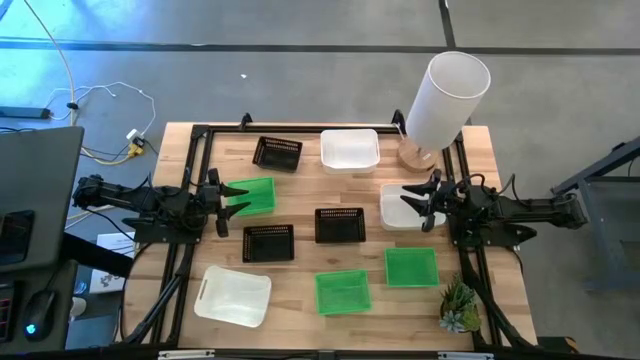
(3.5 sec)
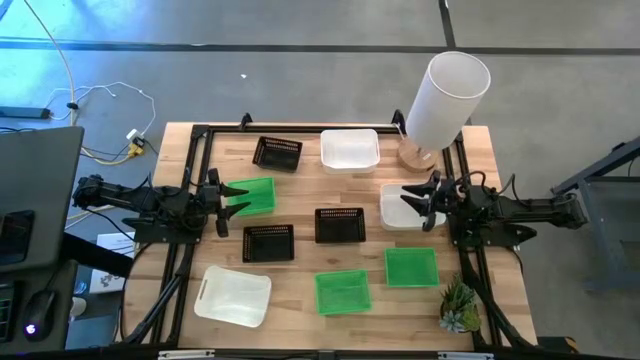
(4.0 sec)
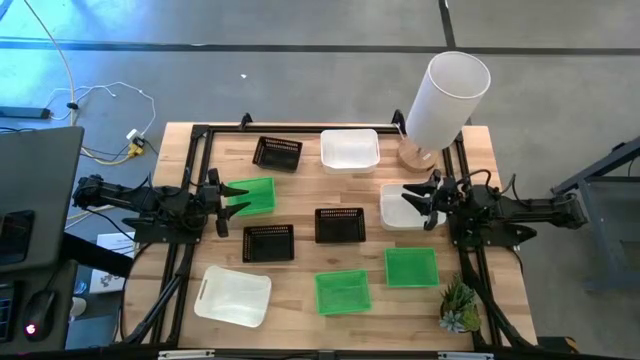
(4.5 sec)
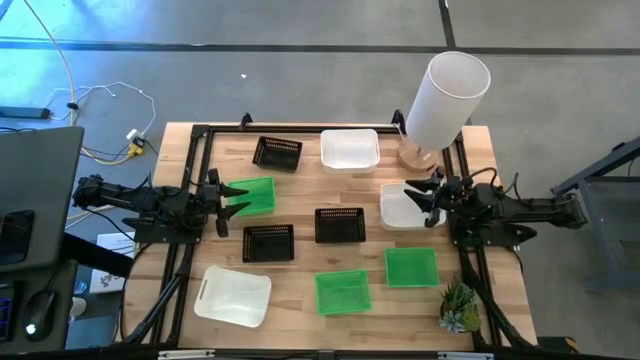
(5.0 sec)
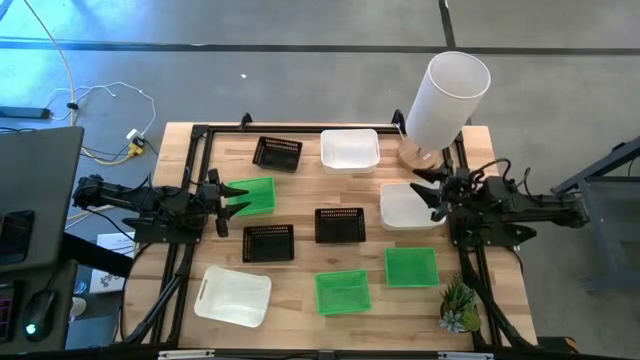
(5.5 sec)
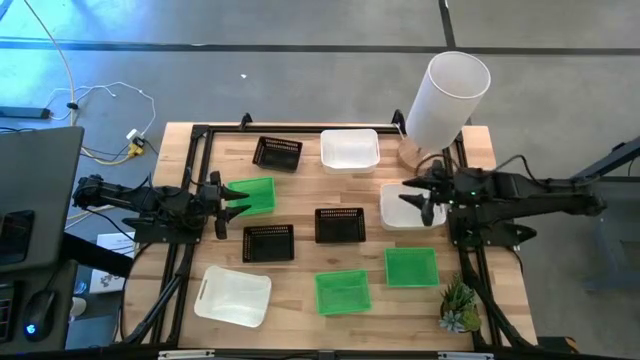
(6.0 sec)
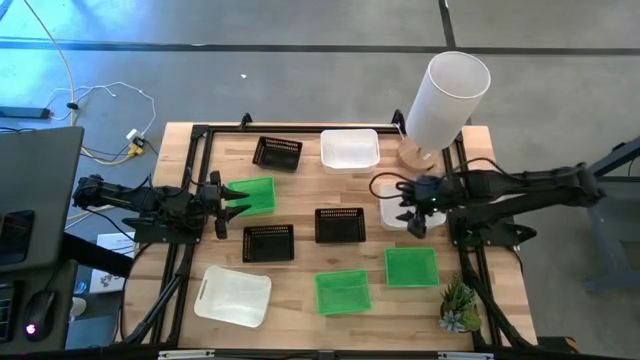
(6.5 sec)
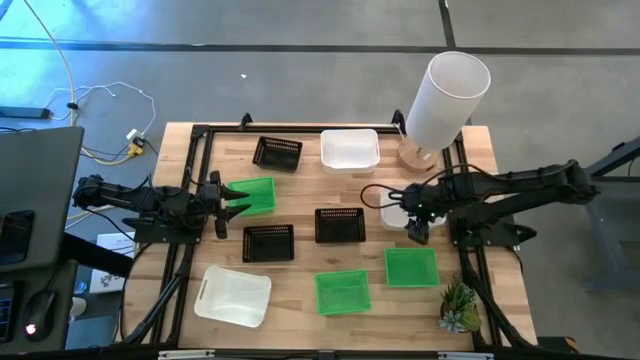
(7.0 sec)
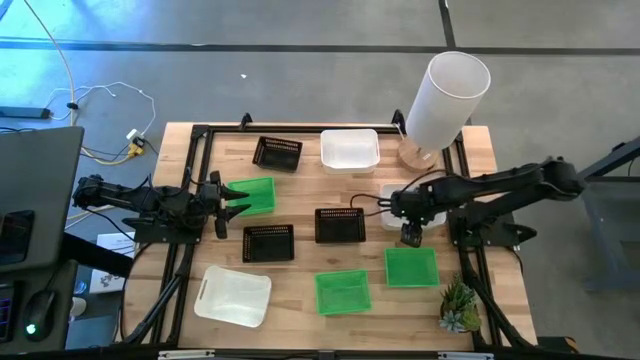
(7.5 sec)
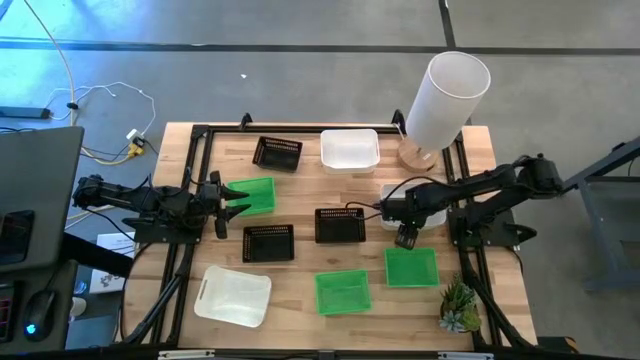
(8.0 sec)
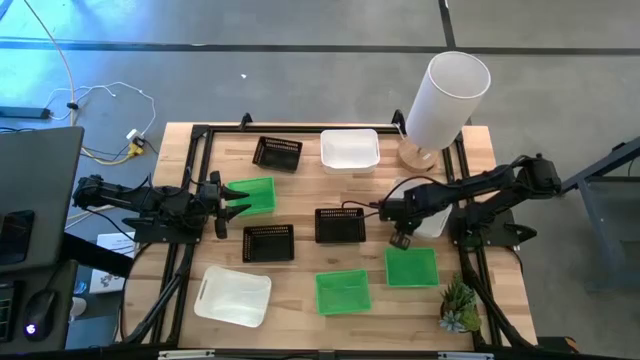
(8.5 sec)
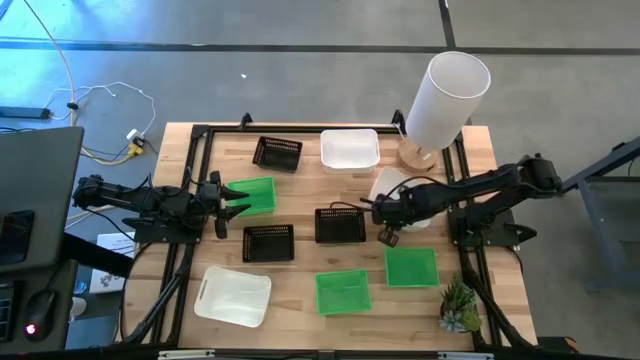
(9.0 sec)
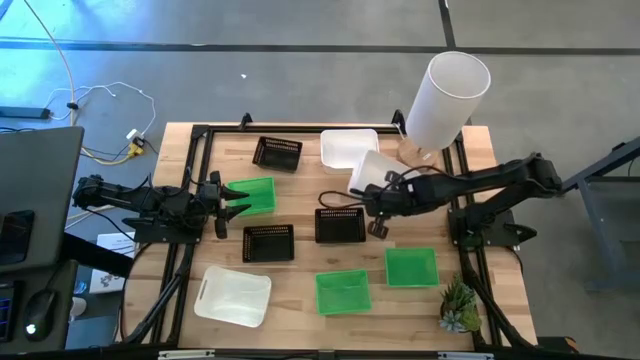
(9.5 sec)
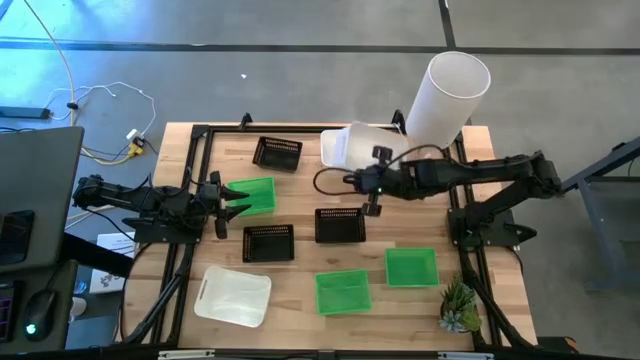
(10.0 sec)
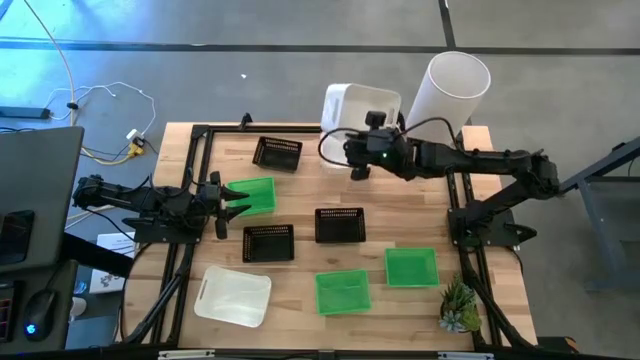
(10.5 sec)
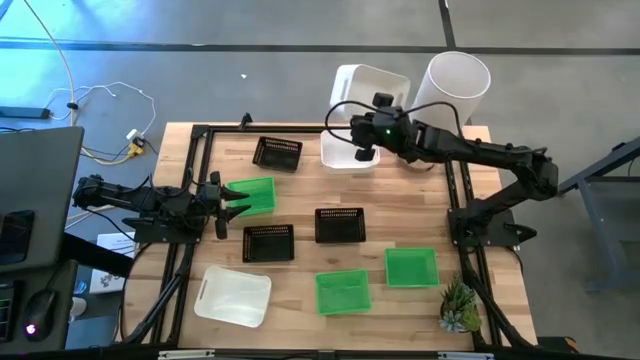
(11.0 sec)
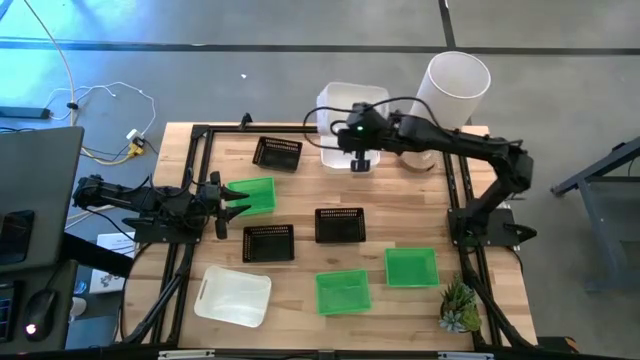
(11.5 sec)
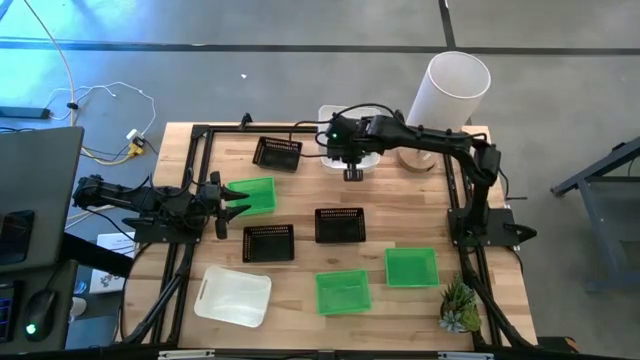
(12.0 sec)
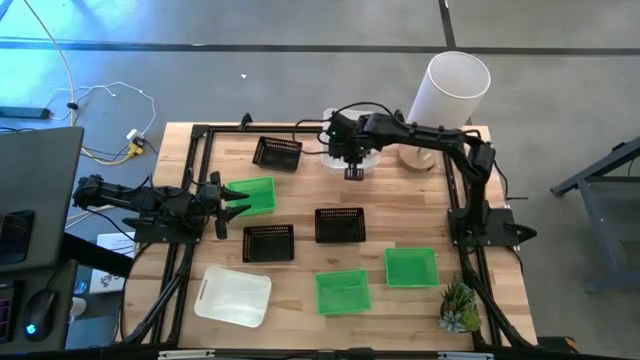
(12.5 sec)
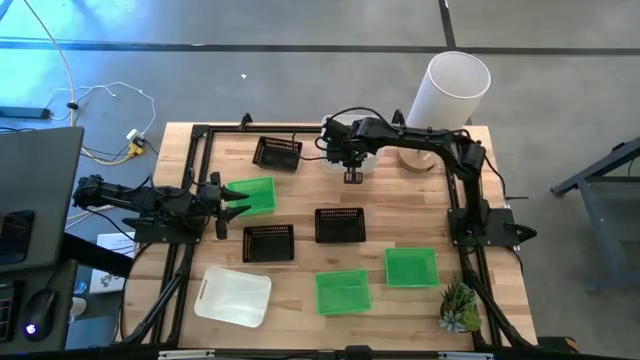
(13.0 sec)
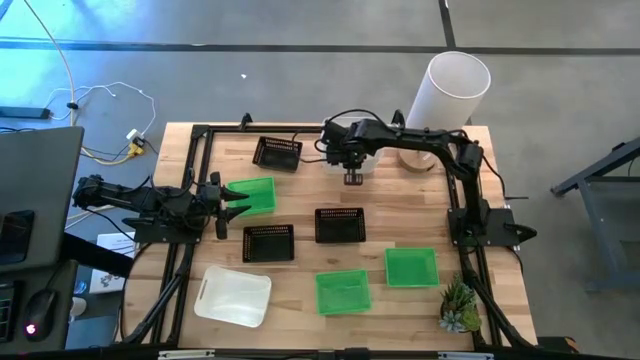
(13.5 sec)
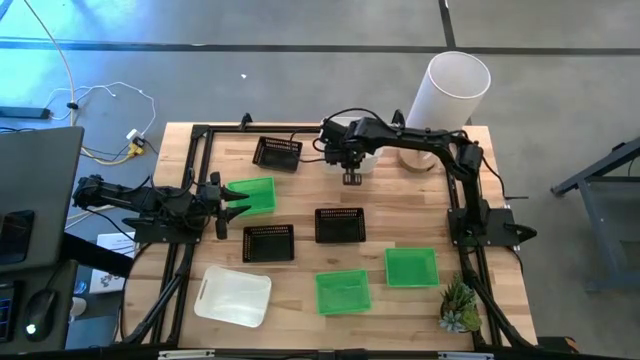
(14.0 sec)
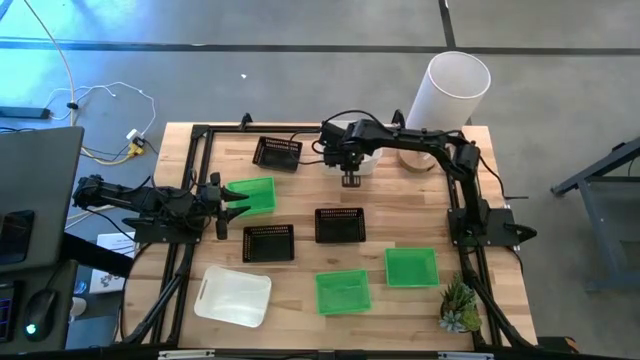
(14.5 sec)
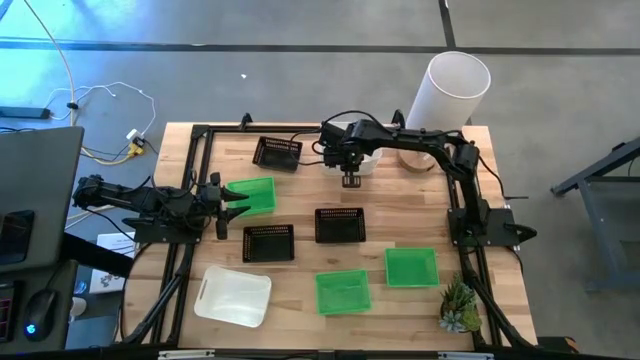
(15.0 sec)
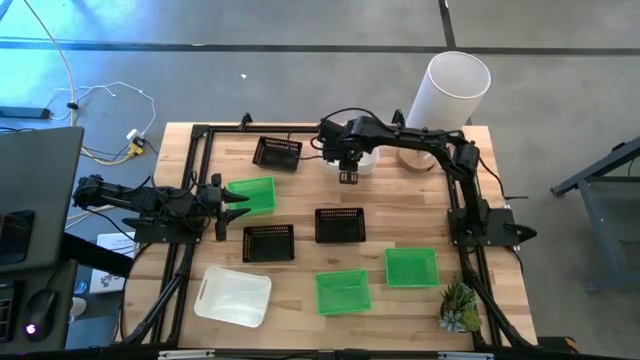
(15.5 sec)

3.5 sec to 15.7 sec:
Task: Stack baskets on shelf by color
Stack the middle white bin on the top white bin

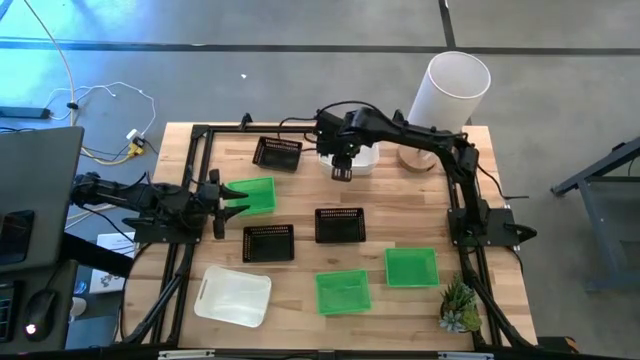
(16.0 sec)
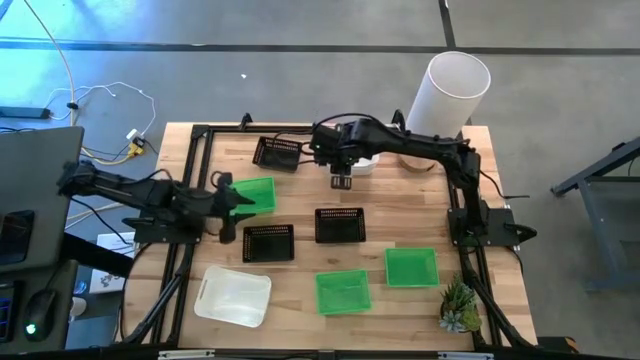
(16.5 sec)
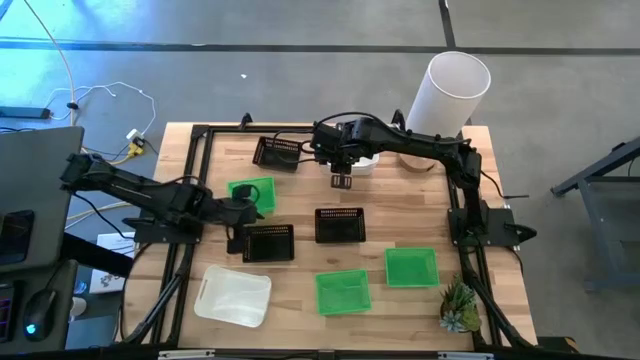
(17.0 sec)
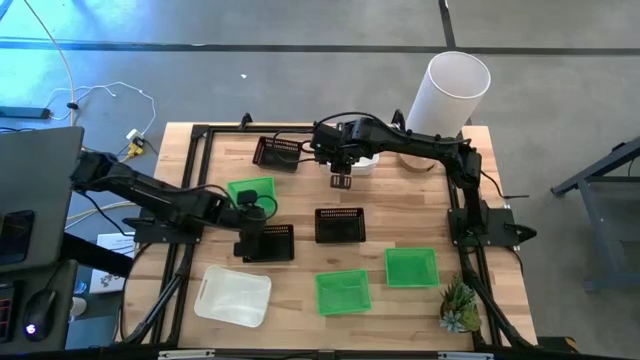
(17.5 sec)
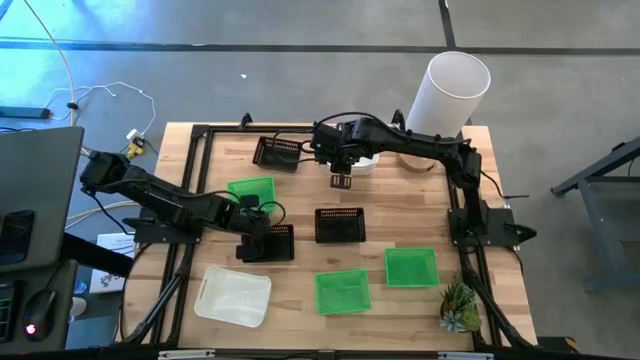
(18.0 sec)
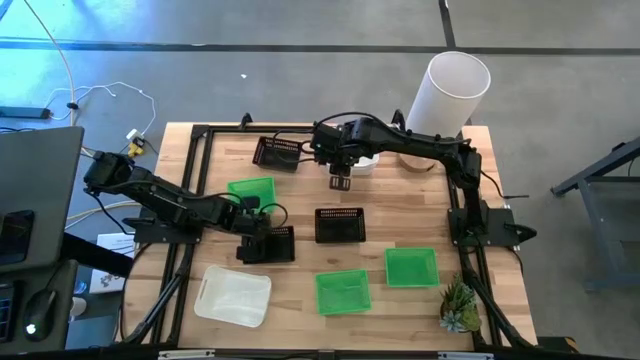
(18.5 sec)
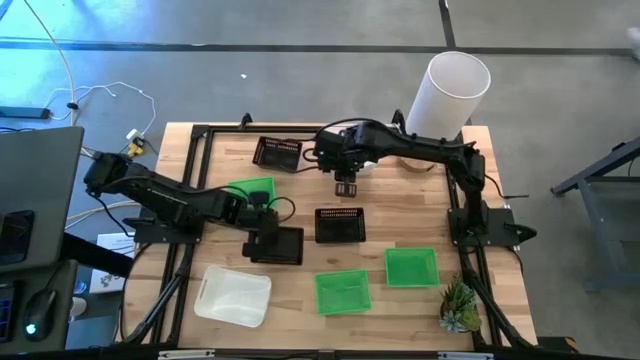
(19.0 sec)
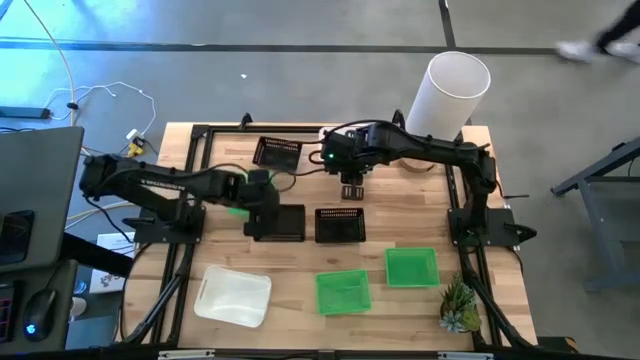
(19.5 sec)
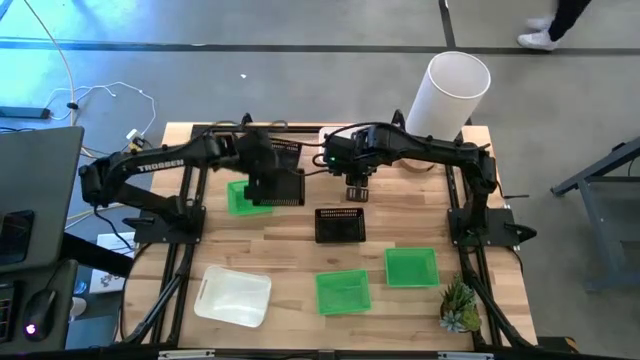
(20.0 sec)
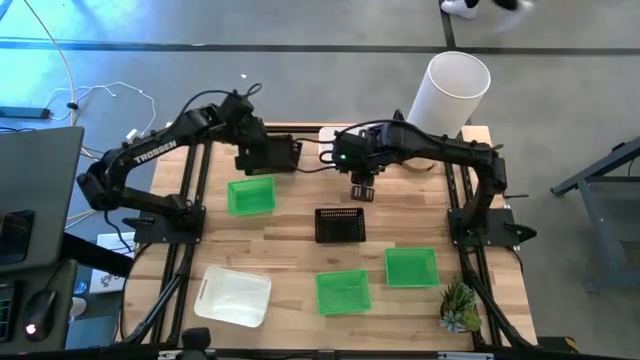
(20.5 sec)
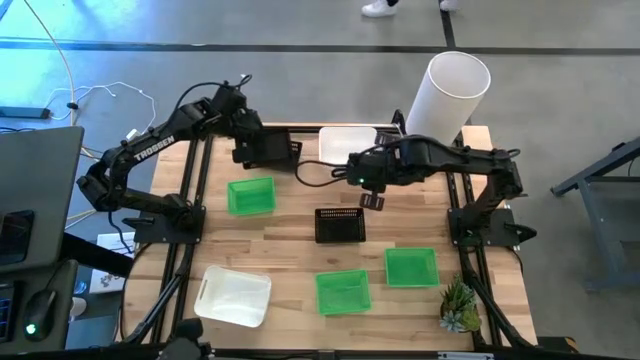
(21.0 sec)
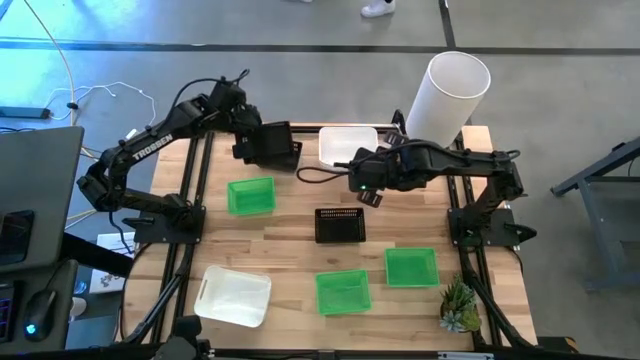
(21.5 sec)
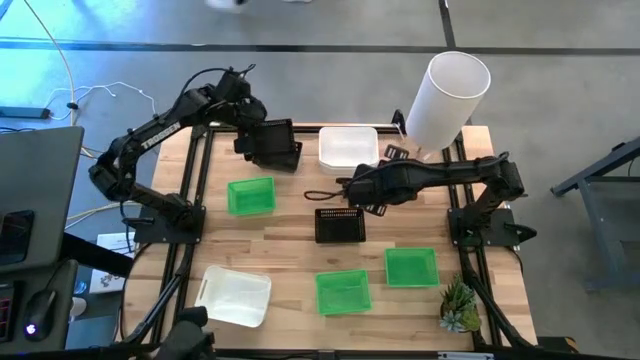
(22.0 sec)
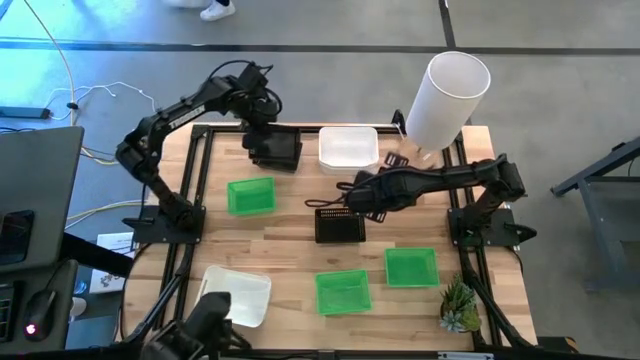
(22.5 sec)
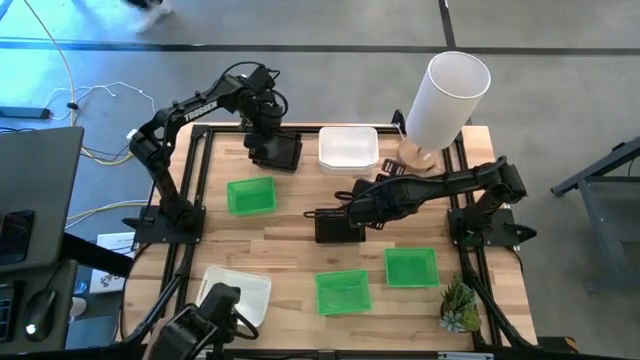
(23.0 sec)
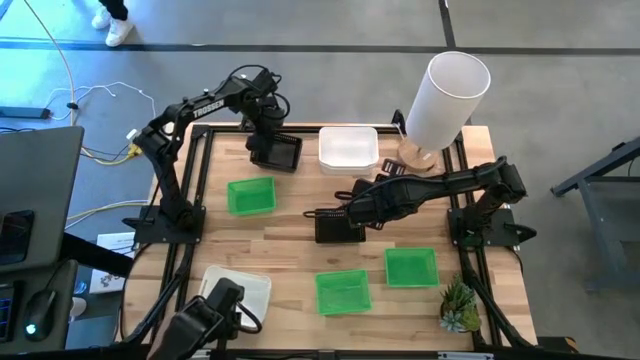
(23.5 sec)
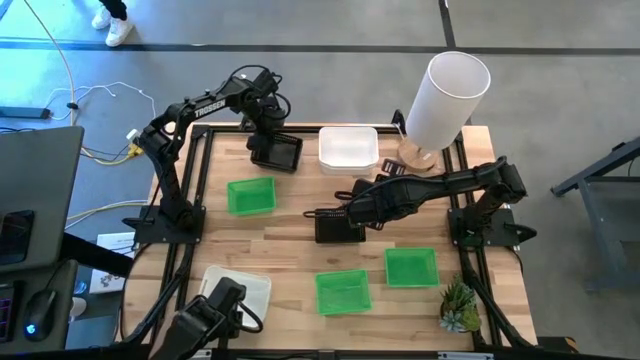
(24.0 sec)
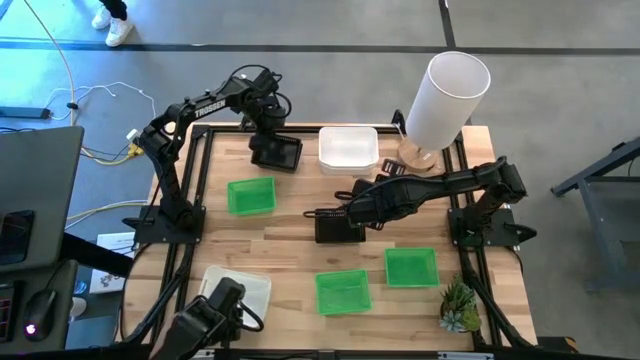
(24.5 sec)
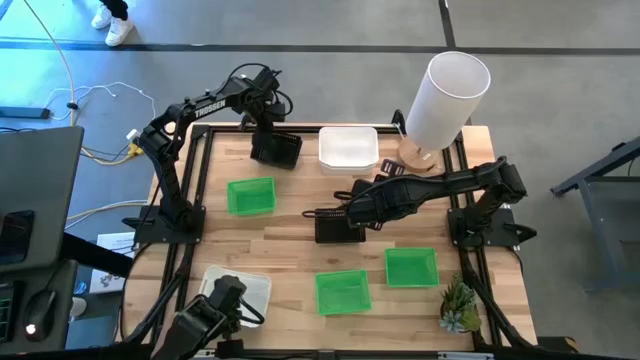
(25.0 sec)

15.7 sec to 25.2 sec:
Stack the bottom left black bin on the top black bin
